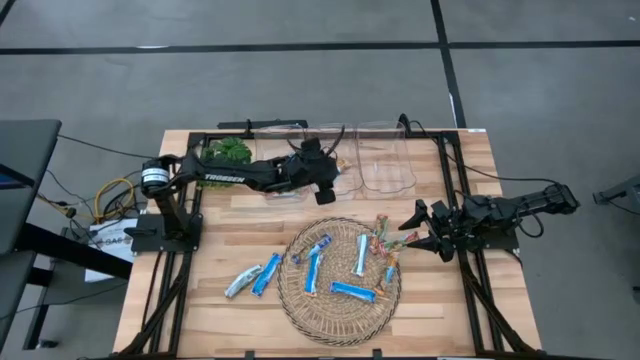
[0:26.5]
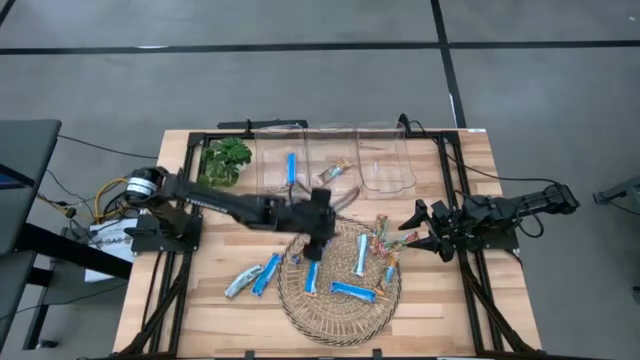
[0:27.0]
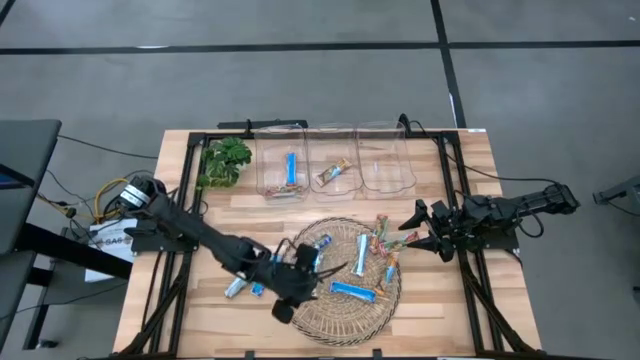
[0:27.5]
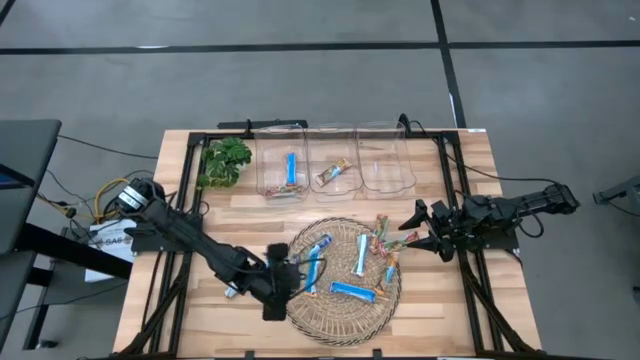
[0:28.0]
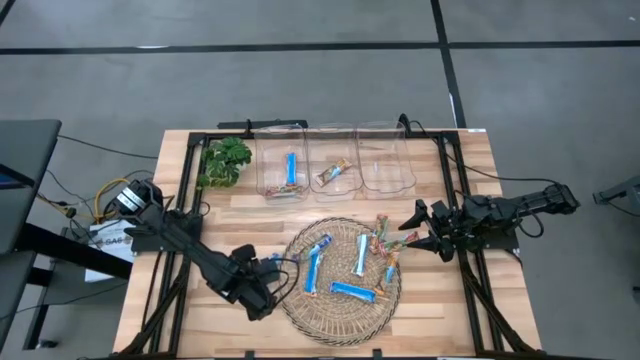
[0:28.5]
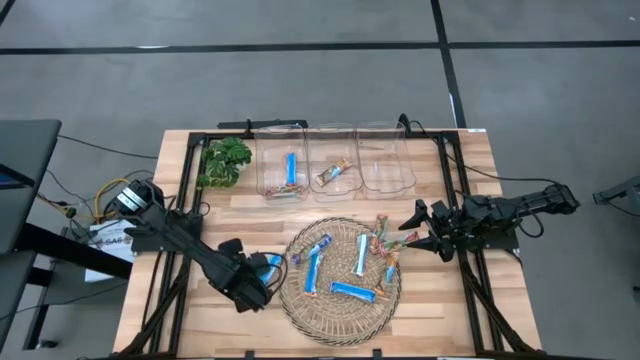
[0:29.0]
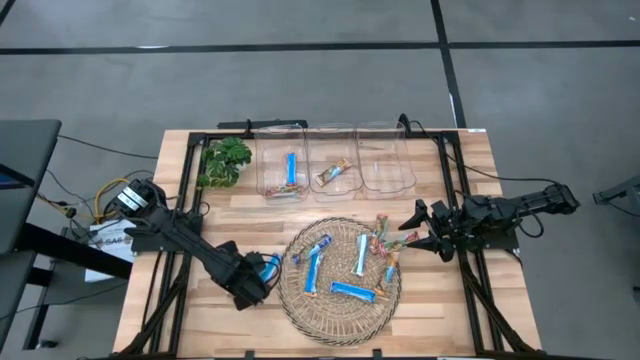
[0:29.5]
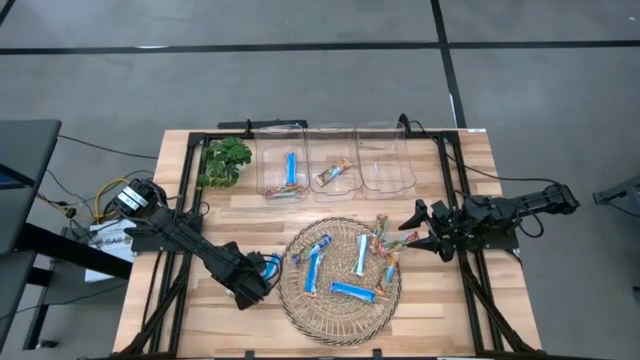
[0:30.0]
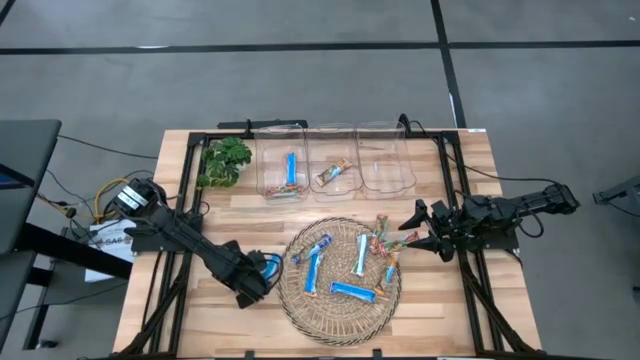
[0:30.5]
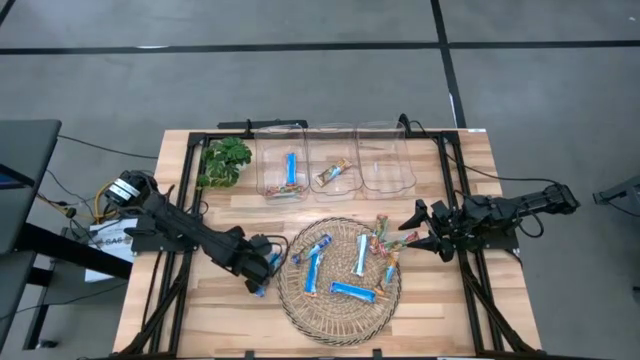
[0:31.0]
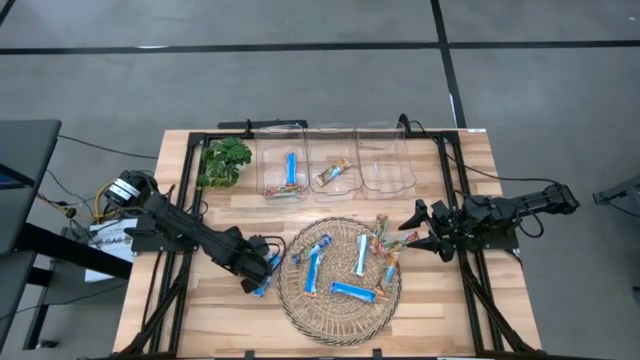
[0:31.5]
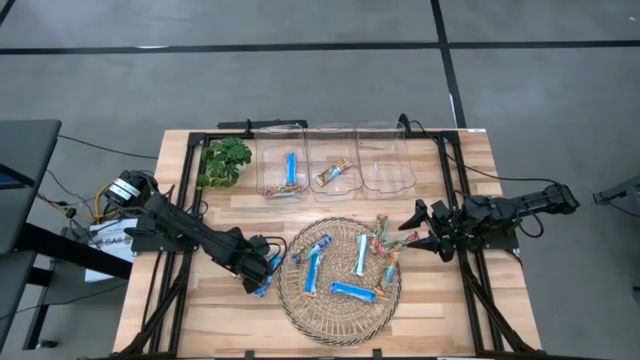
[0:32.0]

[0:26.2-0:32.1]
Task: Pick and place Granola Bars by type
Put the yellow granola bar into the middle transparent bin

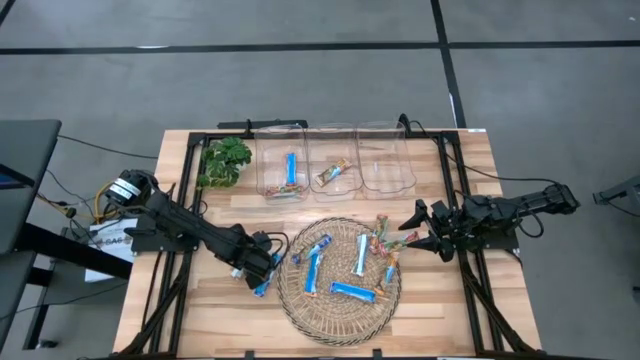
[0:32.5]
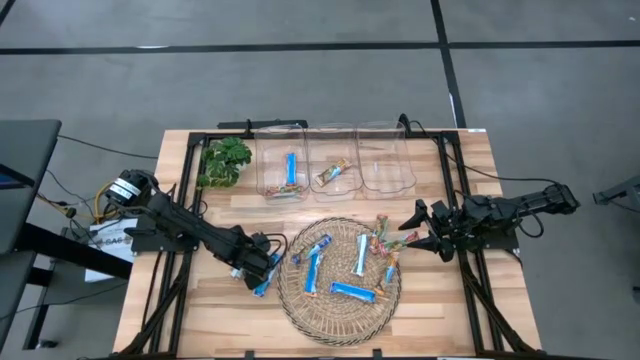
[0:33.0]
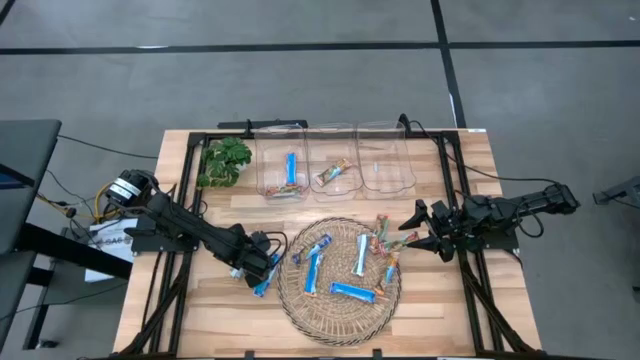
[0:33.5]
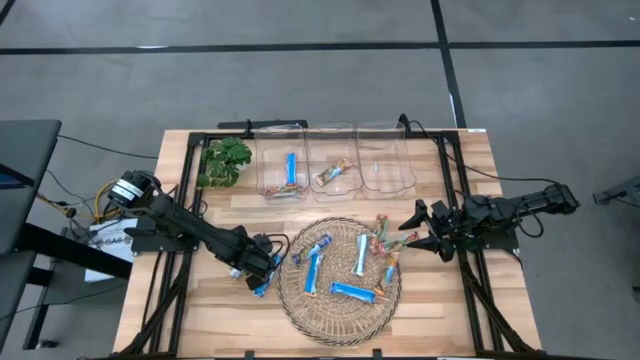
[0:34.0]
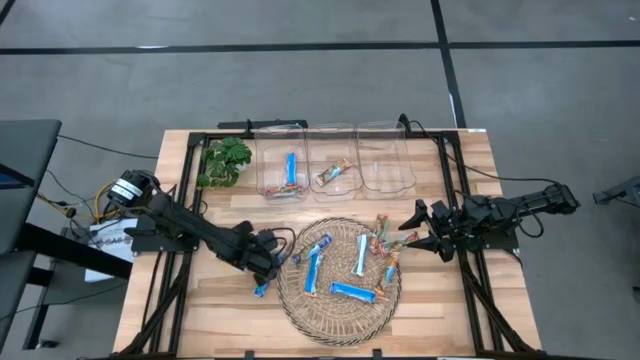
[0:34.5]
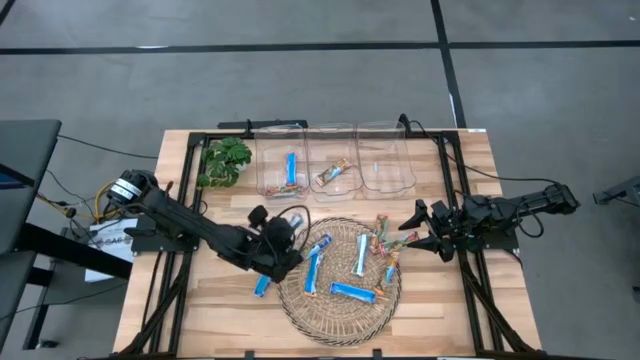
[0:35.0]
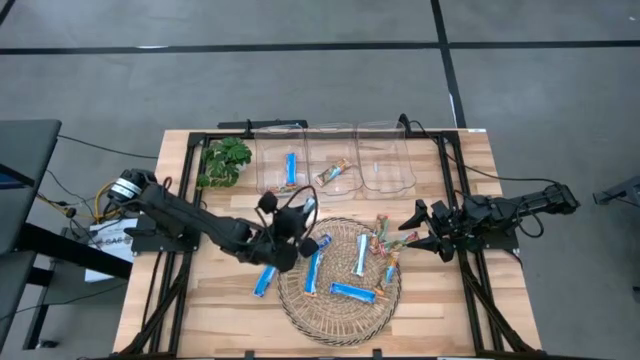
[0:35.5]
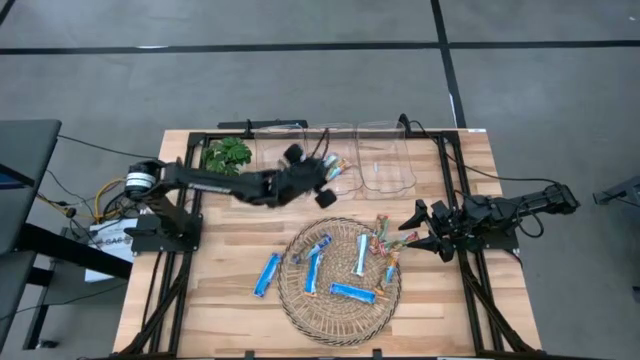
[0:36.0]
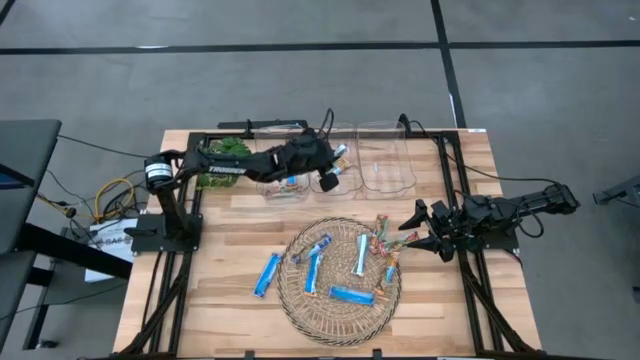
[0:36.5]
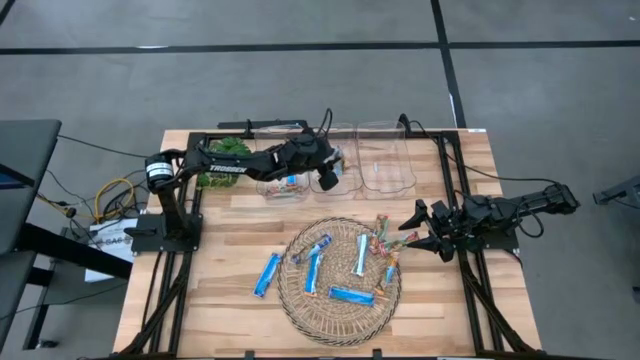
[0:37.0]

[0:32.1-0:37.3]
Put the yellow granola bar into the middle transparent bin

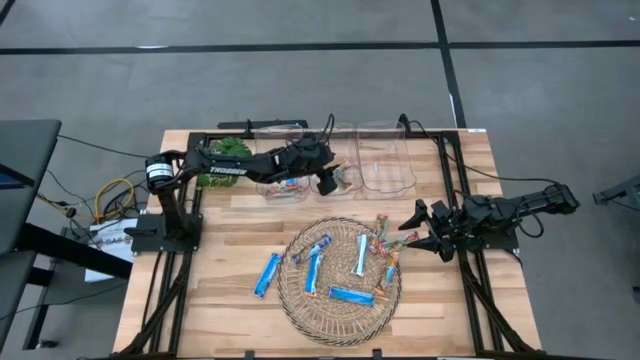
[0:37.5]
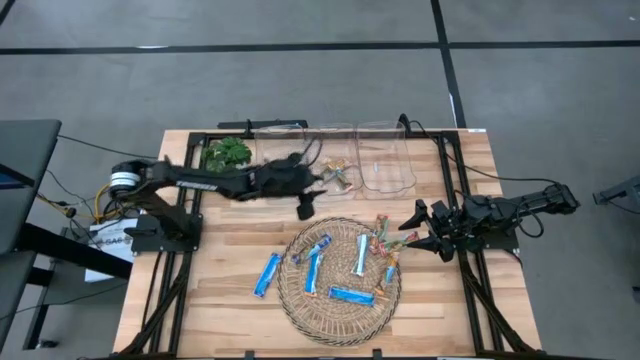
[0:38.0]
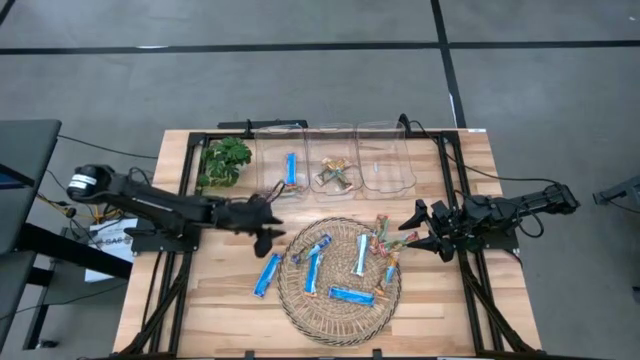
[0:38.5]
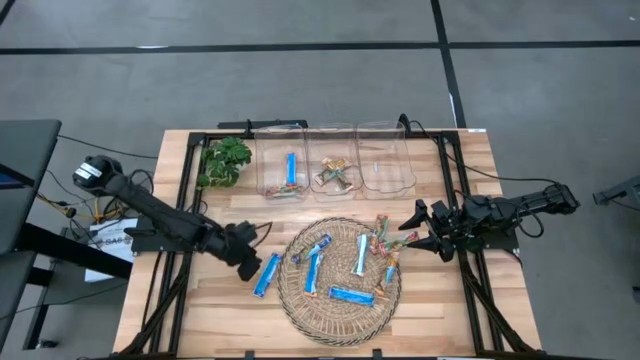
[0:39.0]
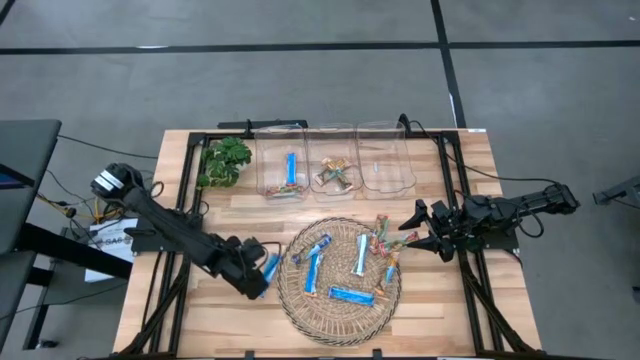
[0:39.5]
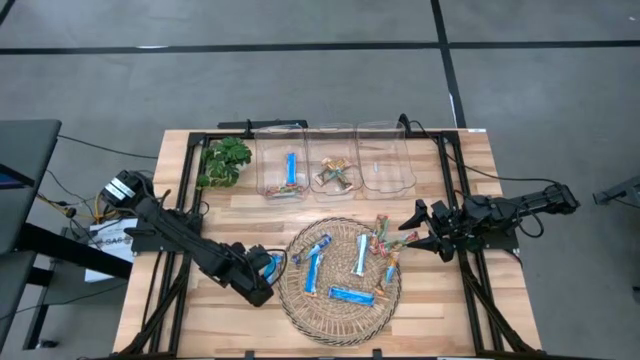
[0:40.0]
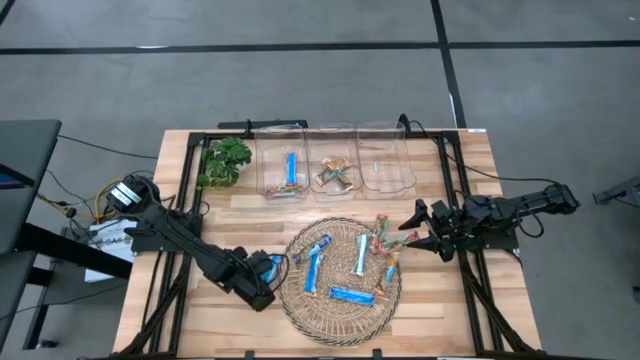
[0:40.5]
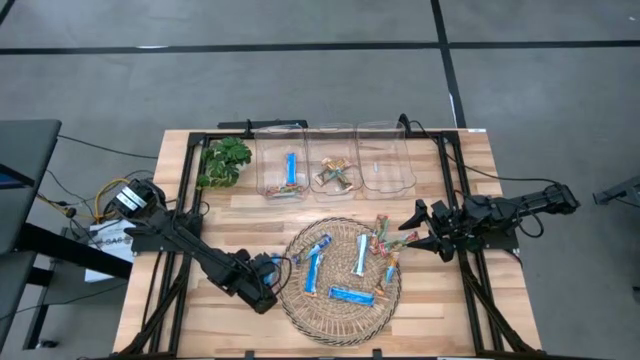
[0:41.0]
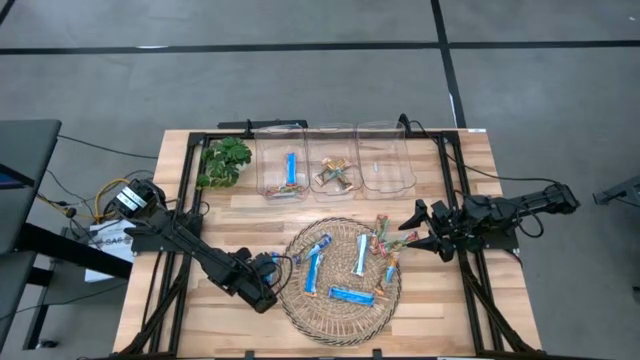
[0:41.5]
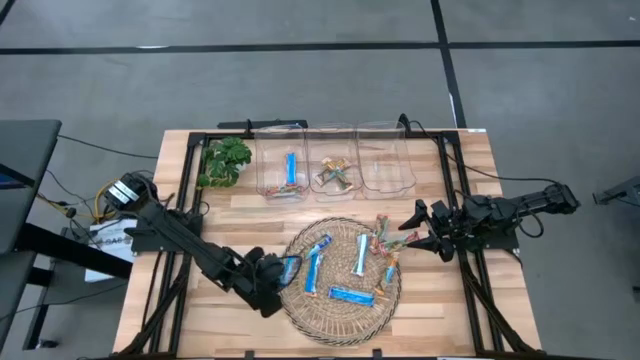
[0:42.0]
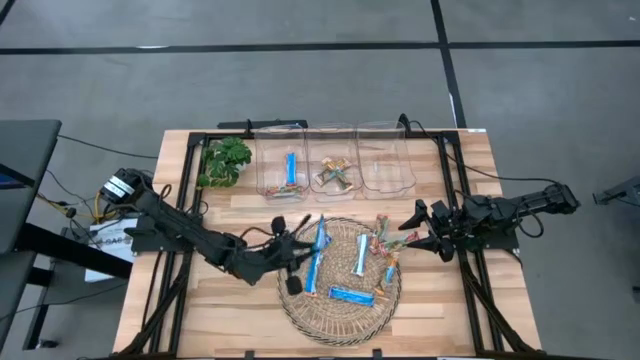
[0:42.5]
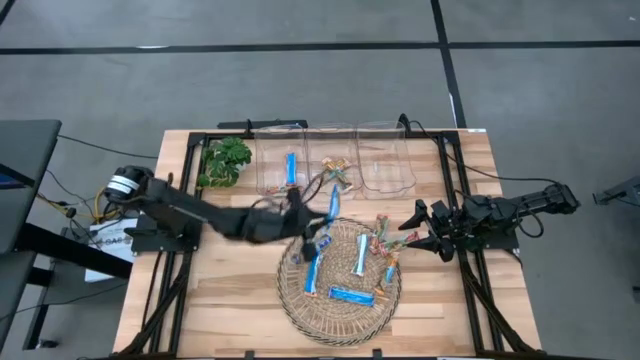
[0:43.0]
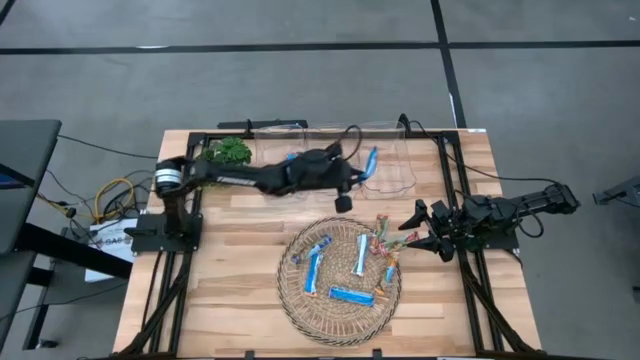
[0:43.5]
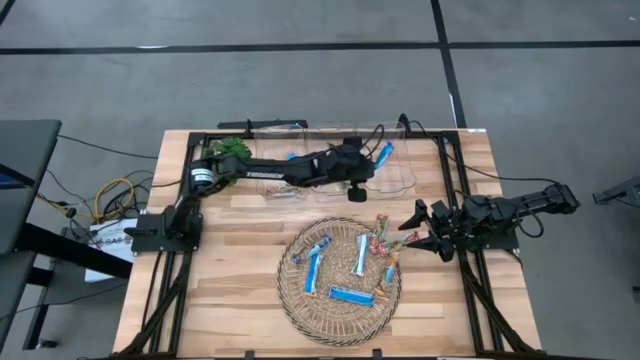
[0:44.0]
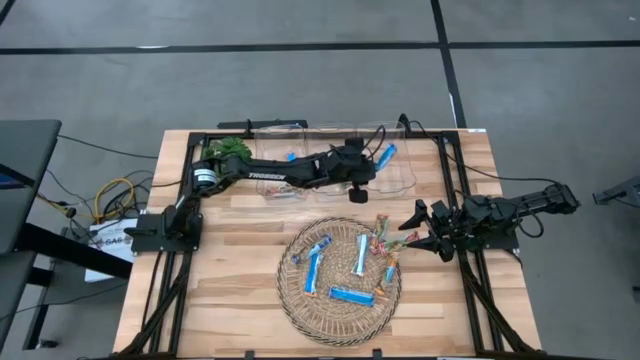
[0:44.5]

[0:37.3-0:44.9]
Put the blue granola bar into the right transparent bin

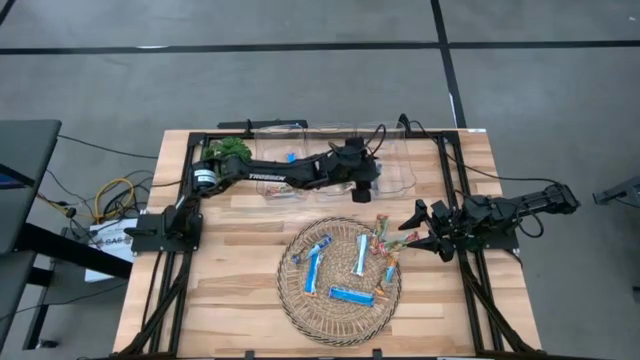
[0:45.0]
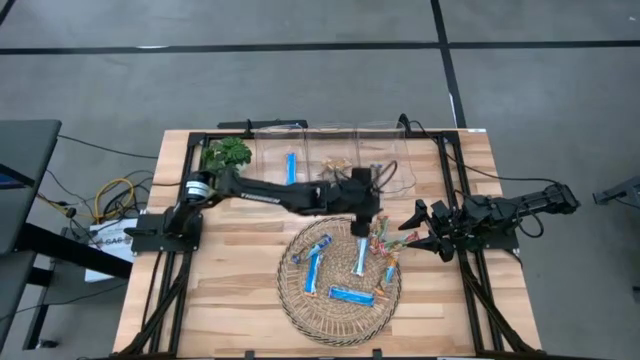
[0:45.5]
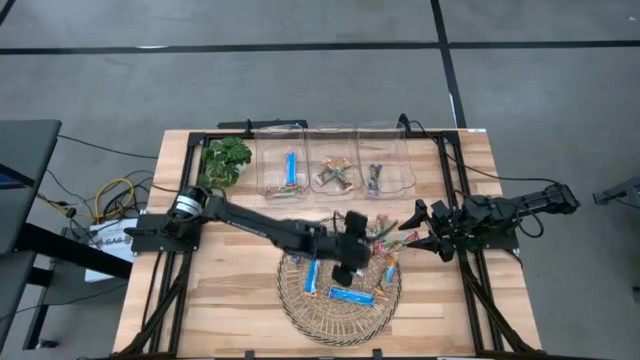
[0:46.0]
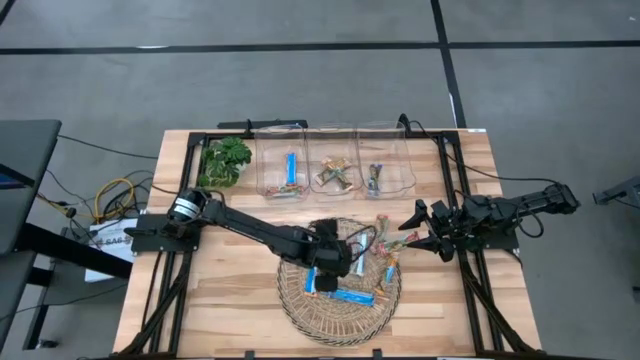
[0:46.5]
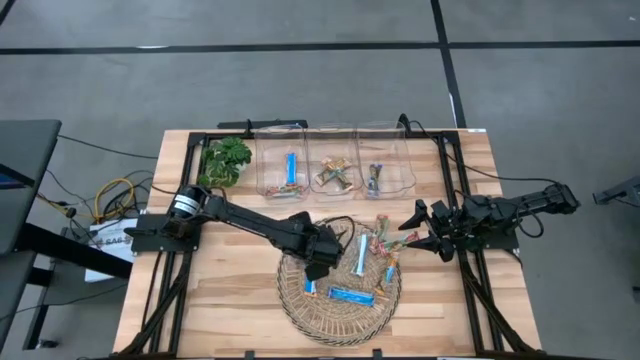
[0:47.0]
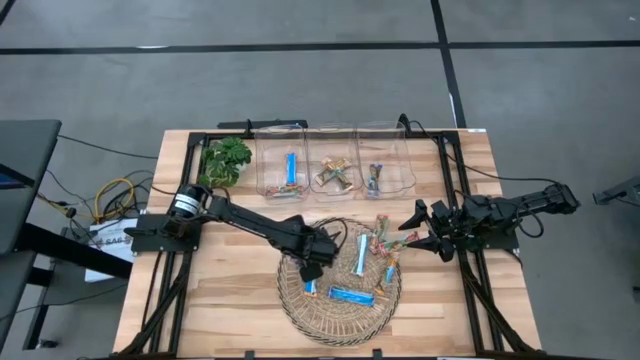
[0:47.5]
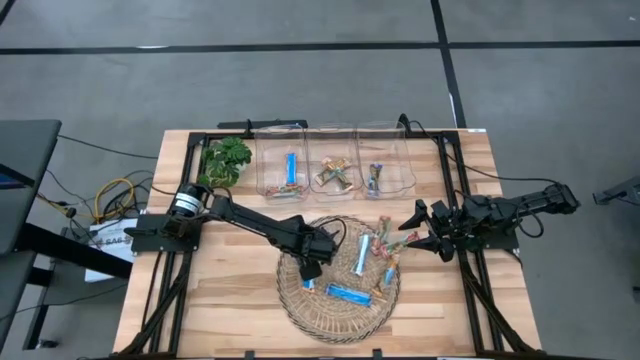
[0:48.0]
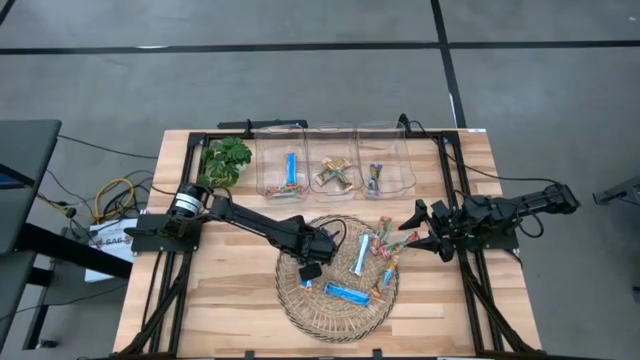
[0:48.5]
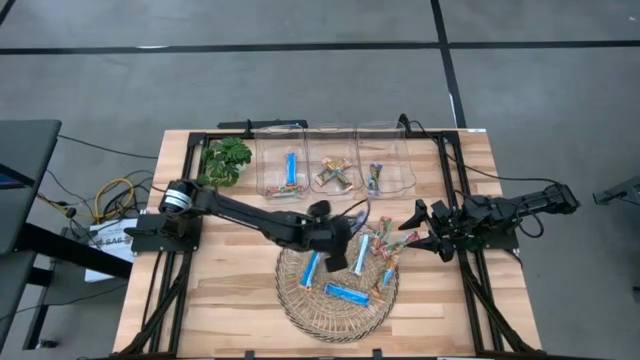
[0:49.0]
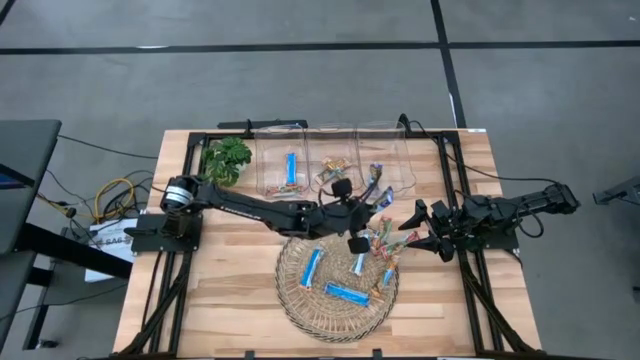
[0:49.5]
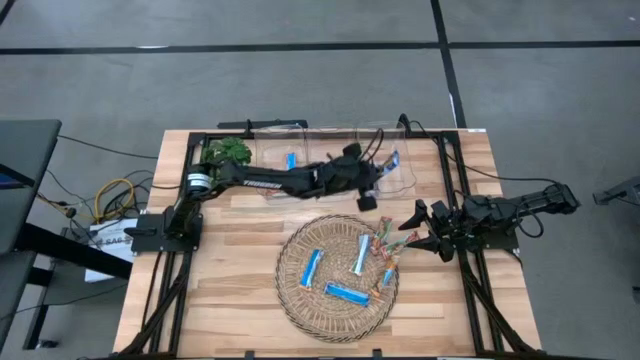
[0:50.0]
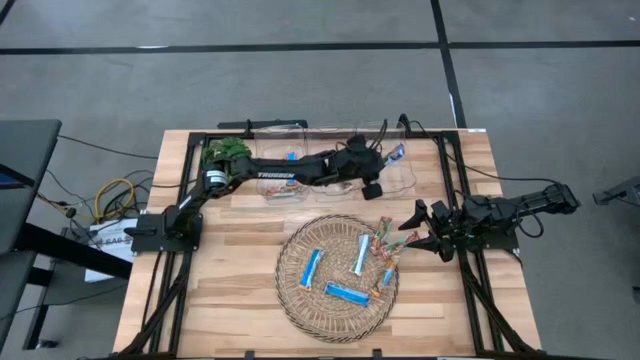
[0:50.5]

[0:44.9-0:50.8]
Put the blue granola bar into the right transparent bin
